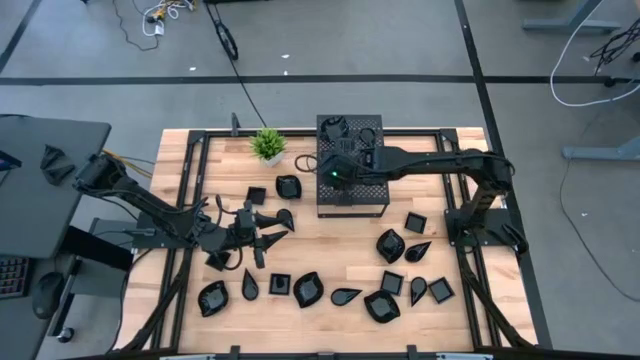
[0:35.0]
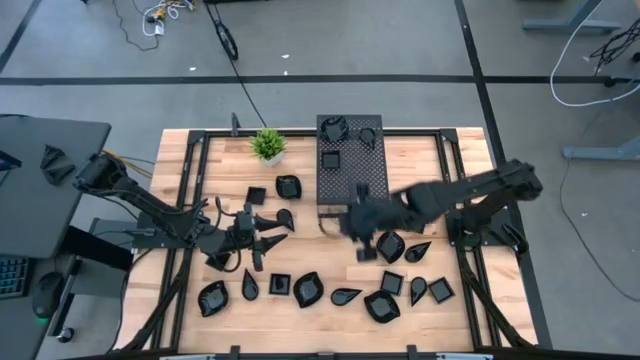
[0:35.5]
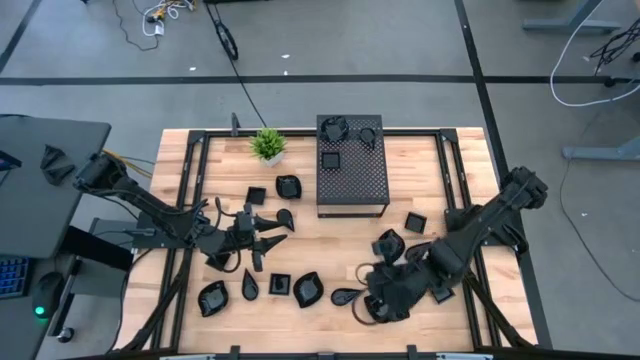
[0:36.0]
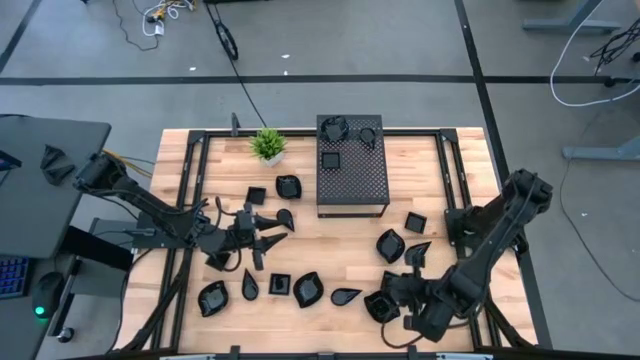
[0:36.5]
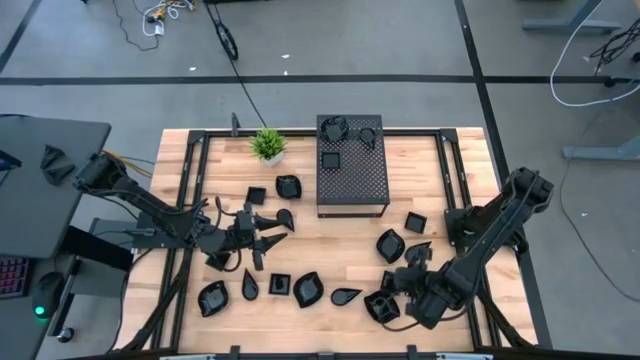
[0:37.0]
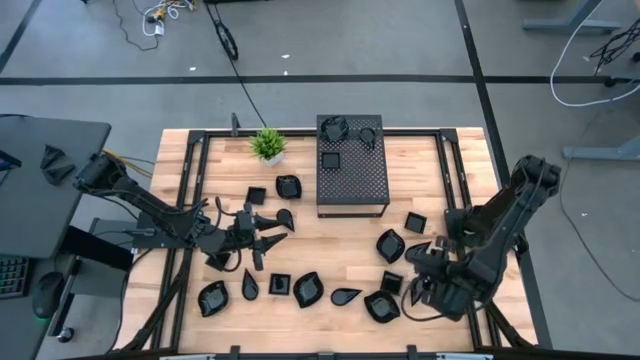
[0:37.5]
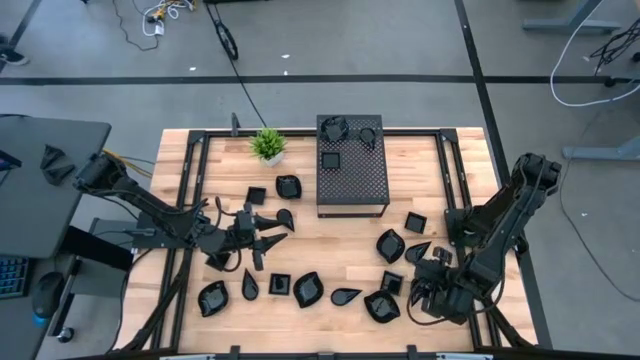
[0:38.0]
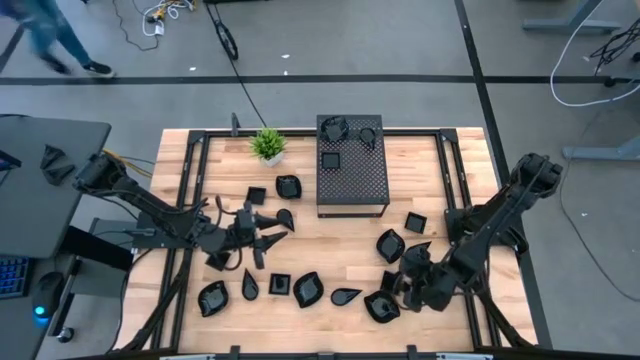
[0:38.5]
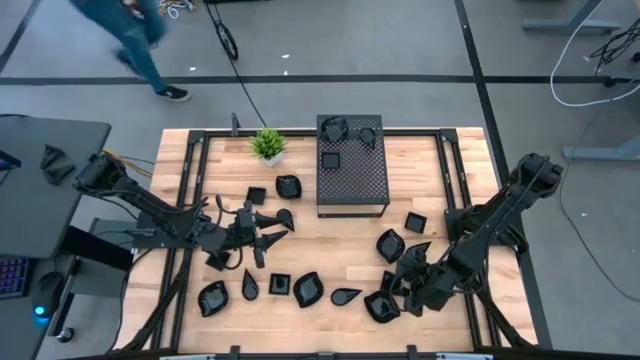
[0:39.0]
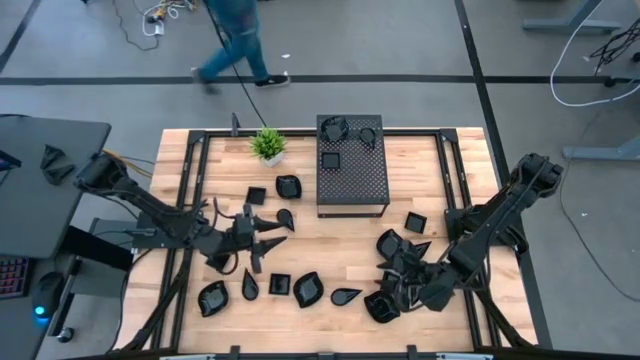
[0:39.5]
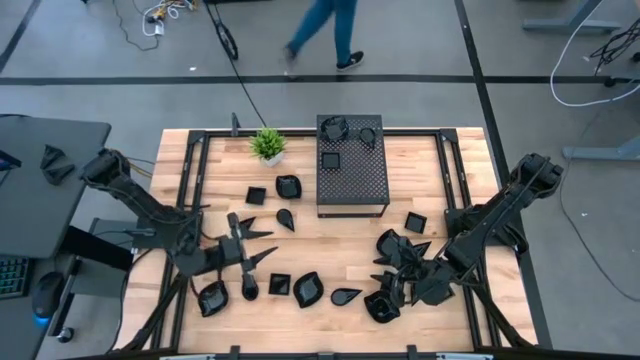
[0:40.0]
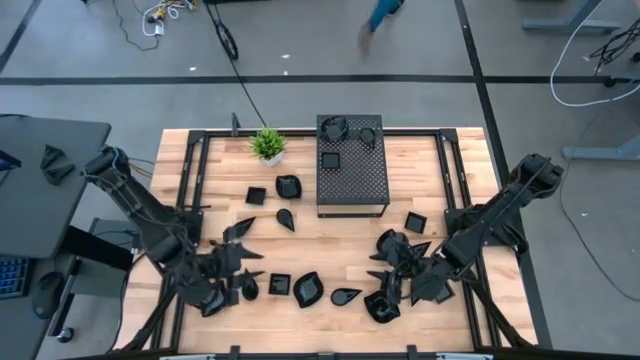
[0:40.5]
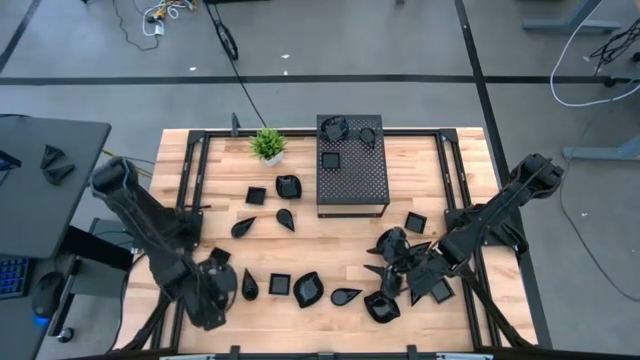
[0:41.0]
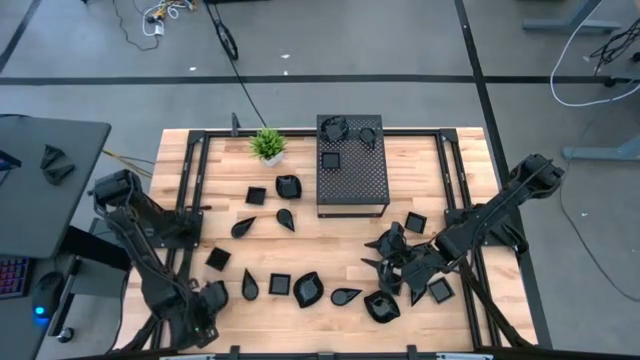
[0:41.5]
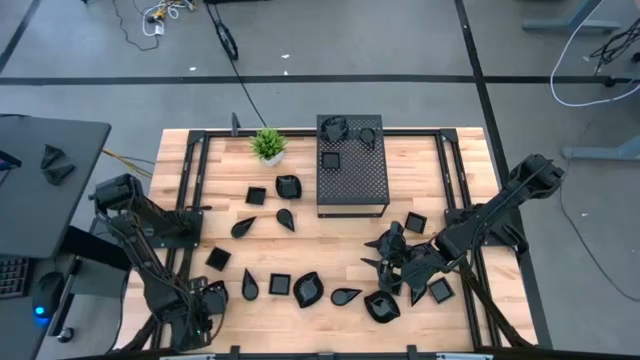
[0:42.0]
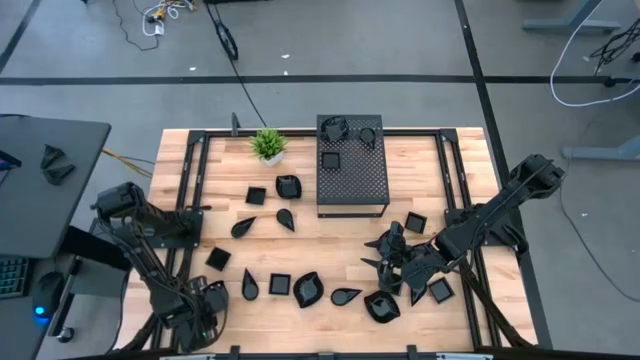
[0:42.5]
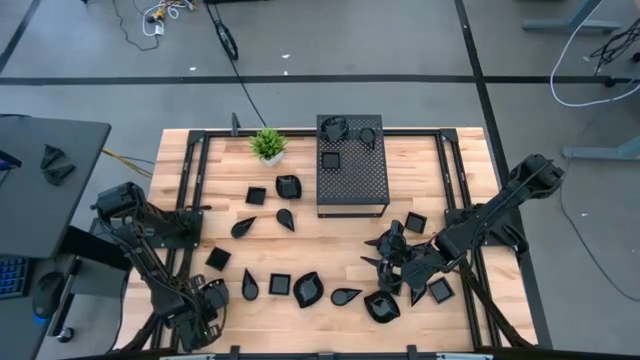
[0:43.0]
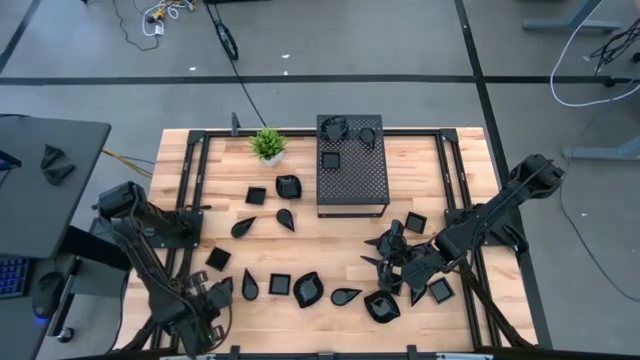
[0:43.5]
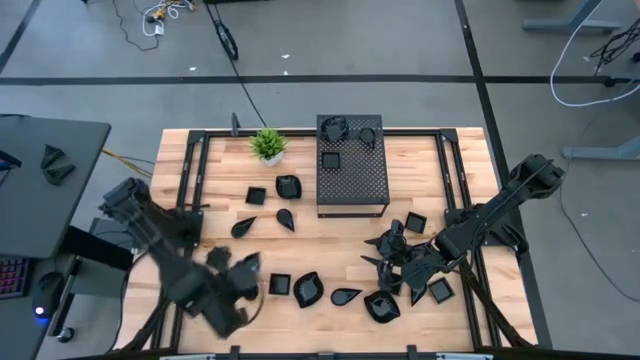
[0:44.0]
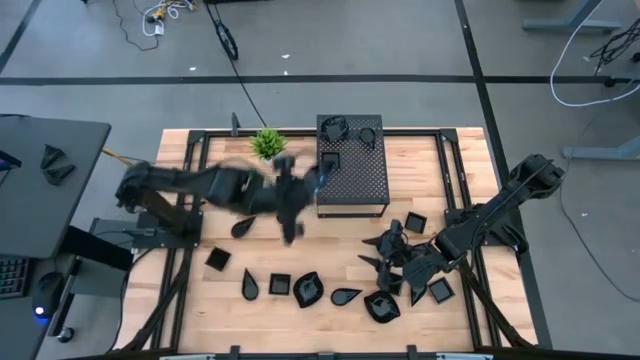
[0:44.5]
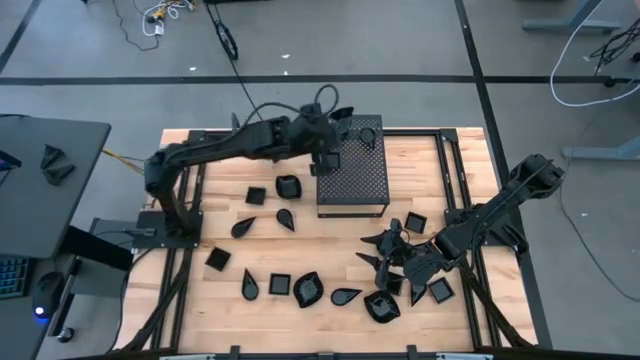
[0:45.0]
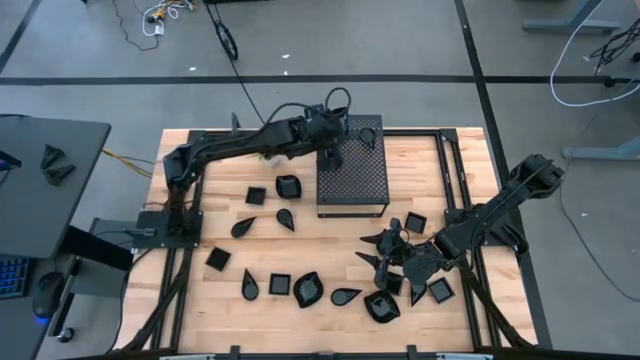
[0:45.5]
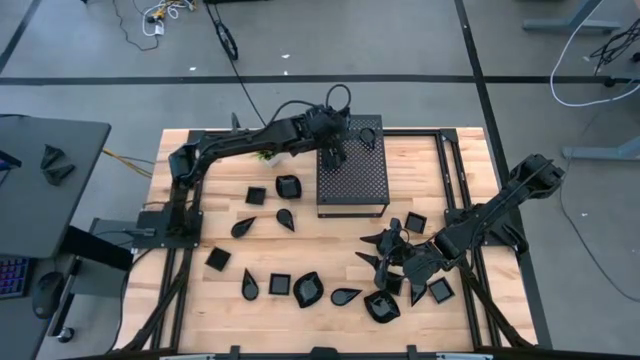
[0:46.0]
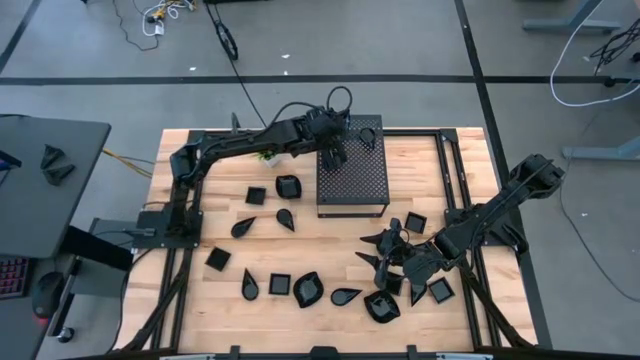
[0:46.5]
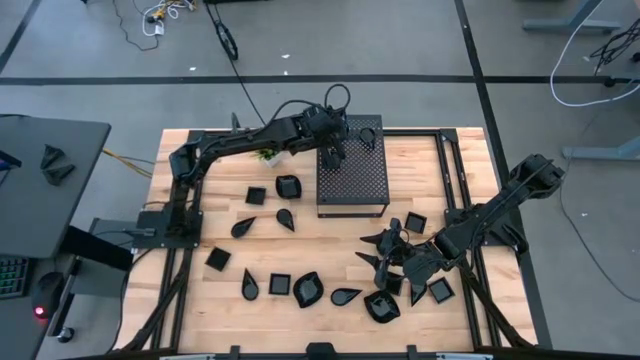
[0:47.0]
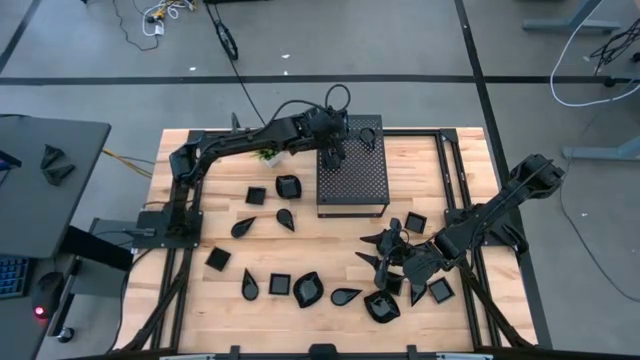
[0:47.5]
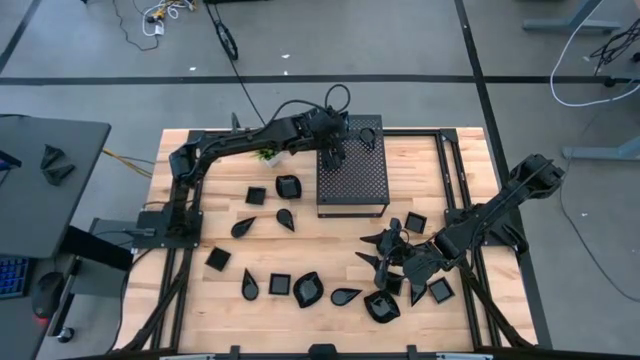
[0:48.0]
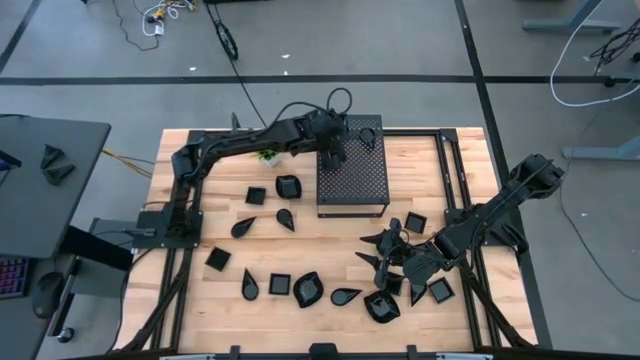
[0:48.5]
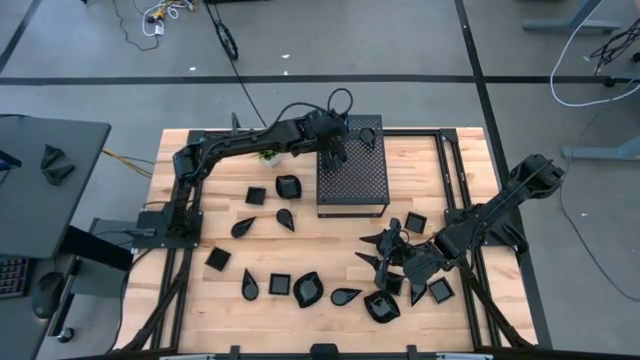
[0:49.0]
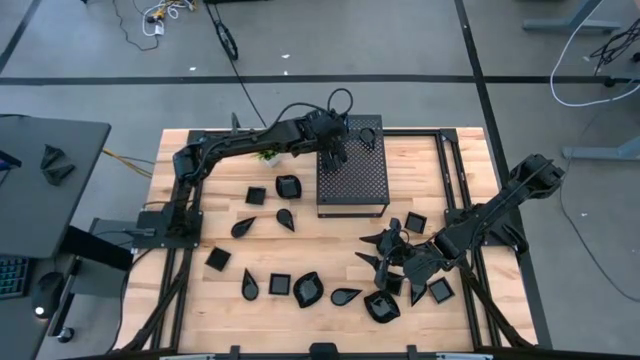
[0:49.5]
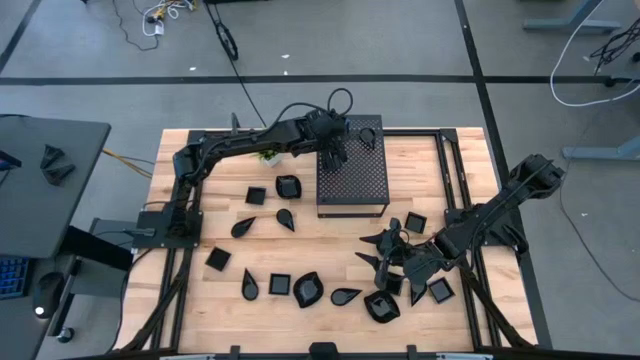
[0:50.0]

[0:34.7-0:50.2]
Task: Pick & Place Mini shaped plates
Stack the leaf shaped plate on top of the leaf shaped plate on the shelf

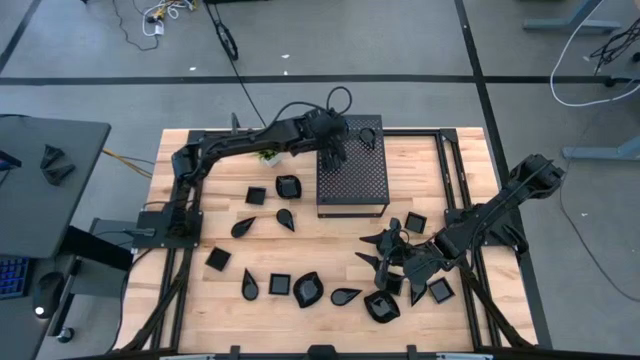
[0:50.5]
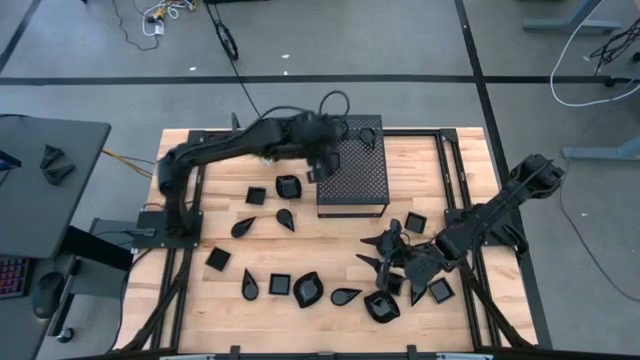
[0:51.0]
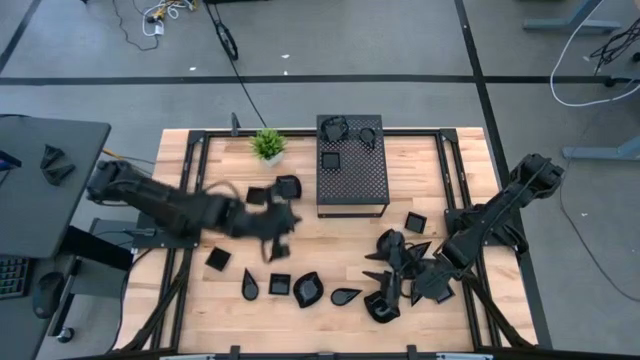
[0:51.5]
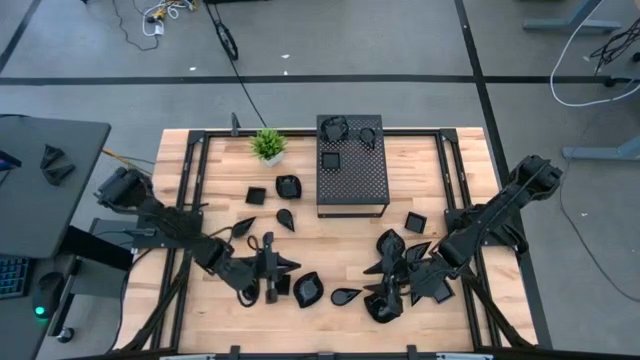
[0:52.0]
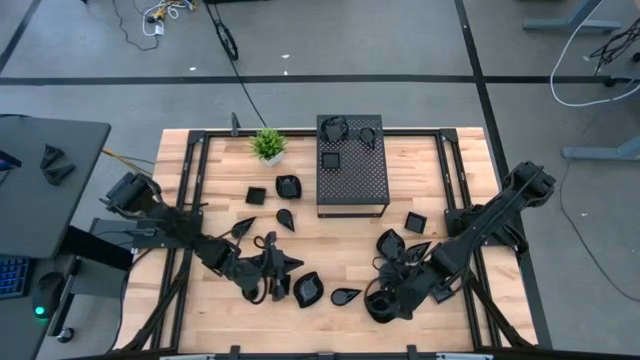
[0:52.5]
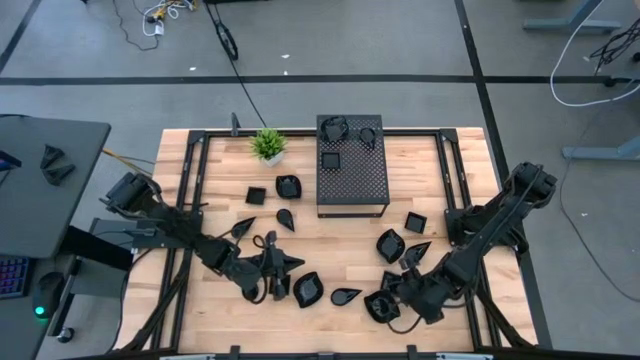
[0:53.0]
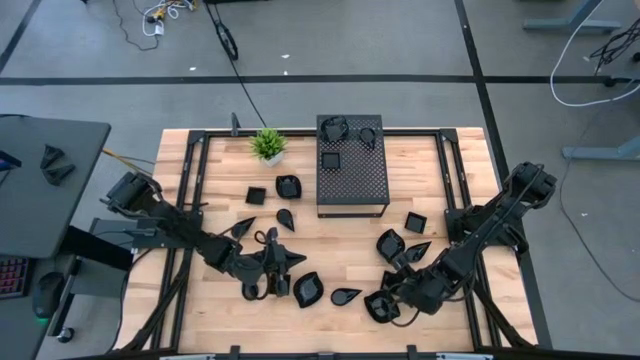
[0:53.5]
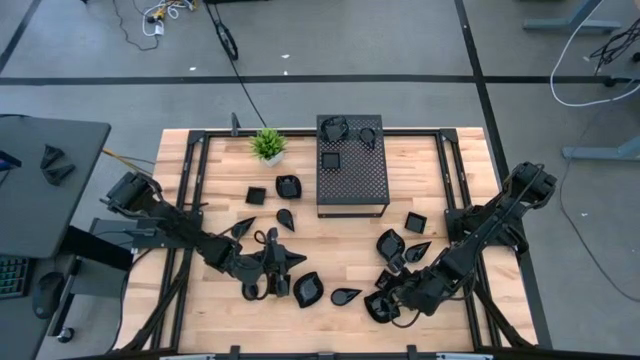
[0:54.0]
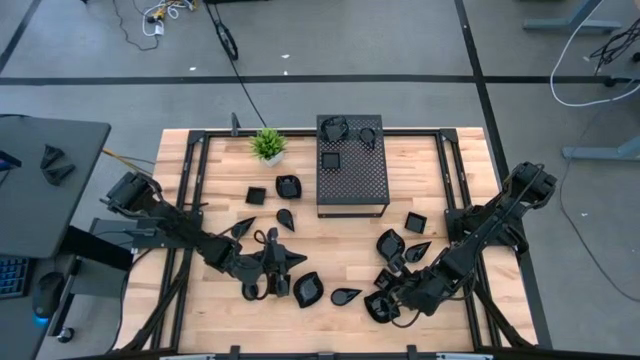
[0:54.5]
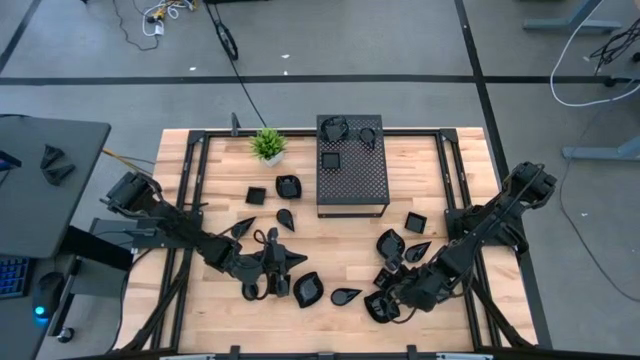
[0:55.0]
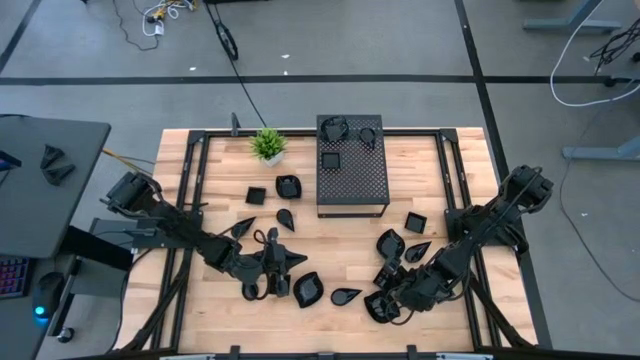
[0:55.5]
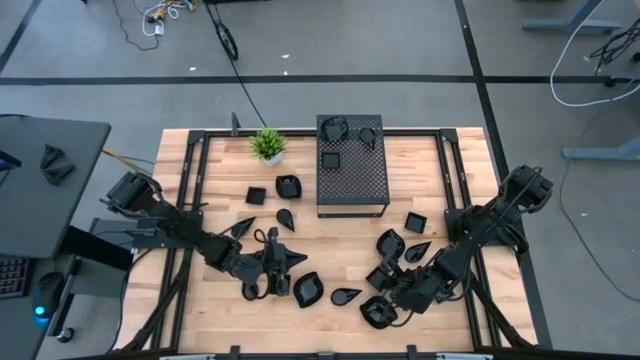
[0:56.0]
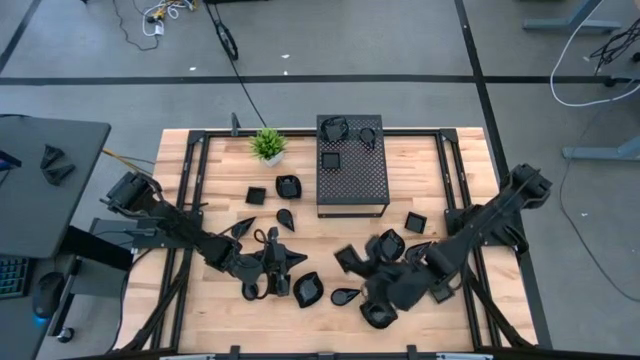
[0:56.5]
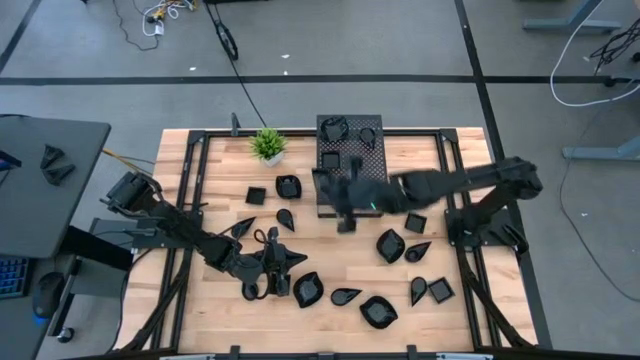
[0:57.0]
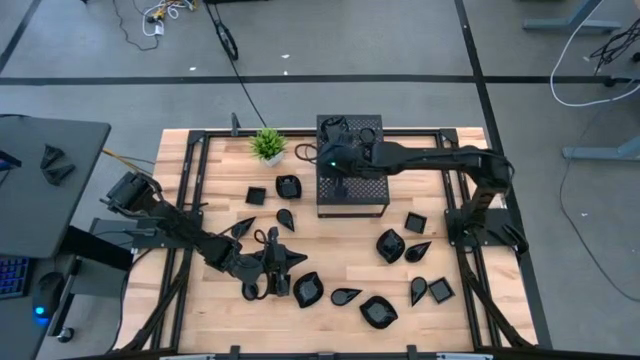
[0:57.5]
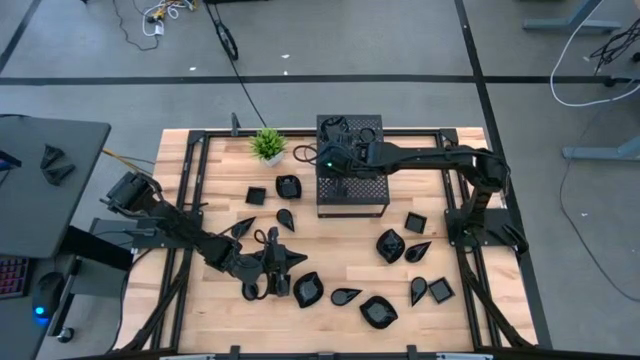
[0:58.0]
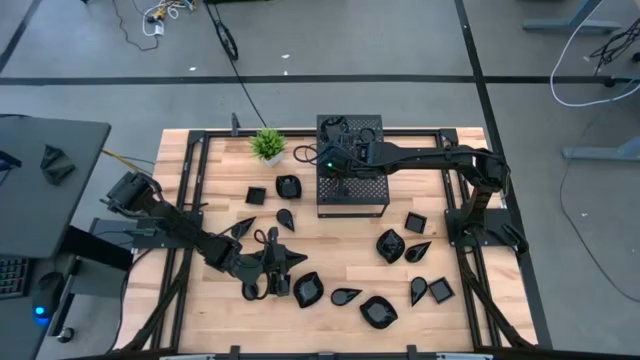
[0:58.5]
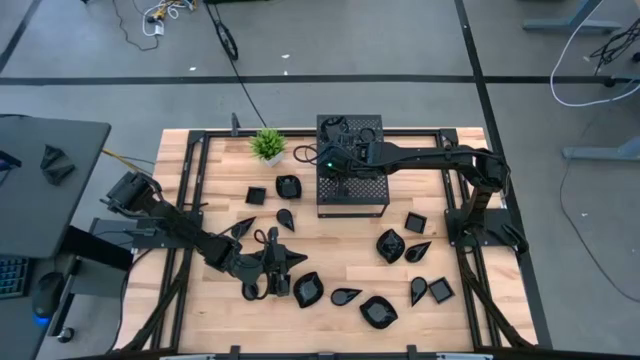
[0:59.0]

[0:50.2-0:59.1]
Stack the square plate on top of the square plate on the shelf
